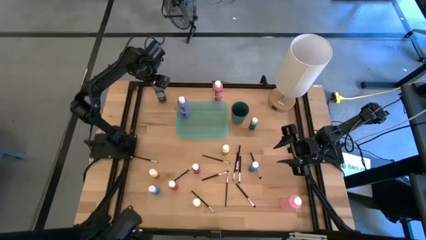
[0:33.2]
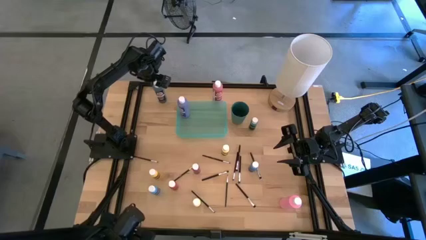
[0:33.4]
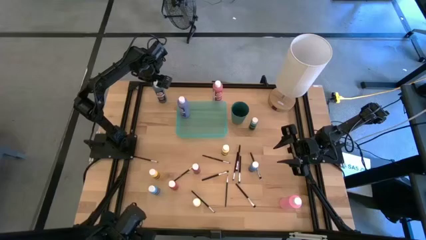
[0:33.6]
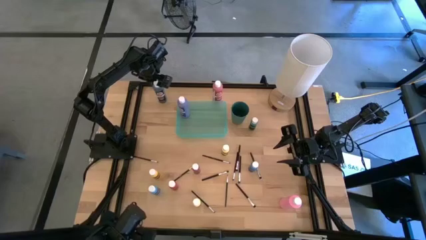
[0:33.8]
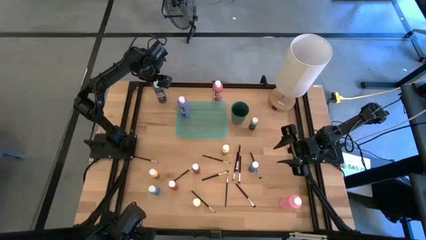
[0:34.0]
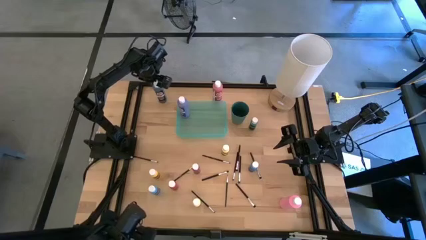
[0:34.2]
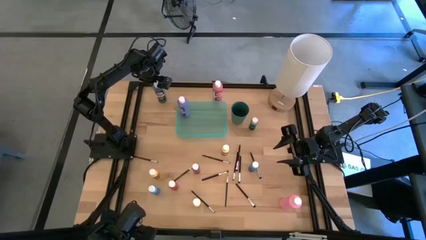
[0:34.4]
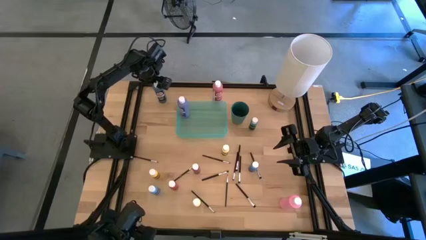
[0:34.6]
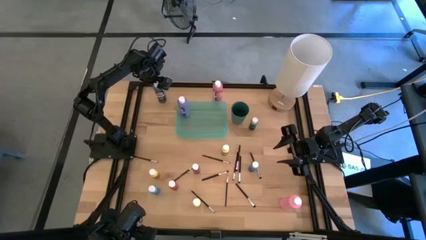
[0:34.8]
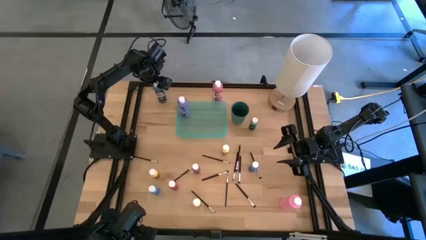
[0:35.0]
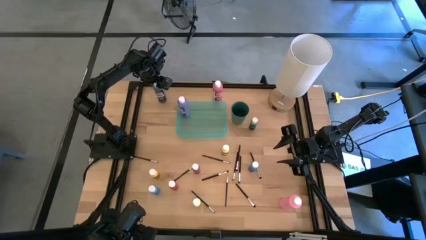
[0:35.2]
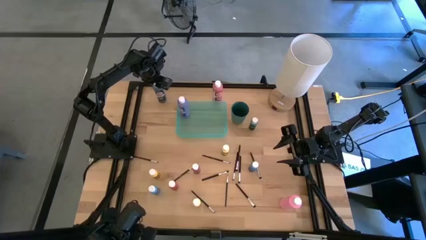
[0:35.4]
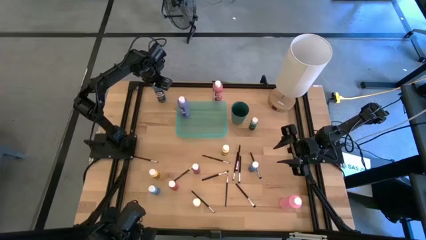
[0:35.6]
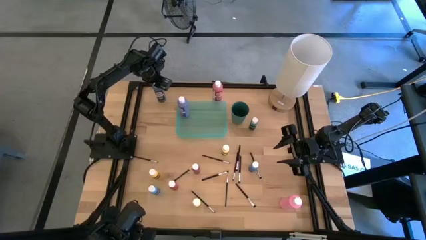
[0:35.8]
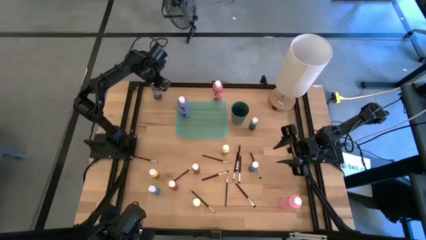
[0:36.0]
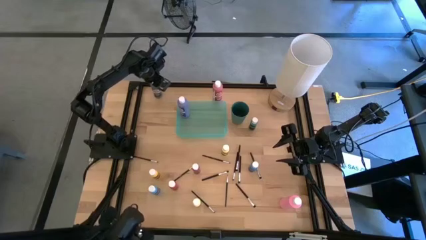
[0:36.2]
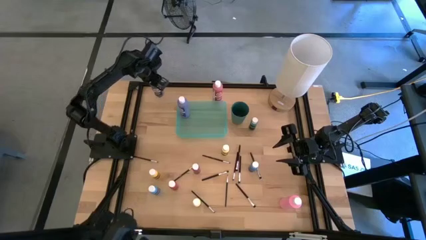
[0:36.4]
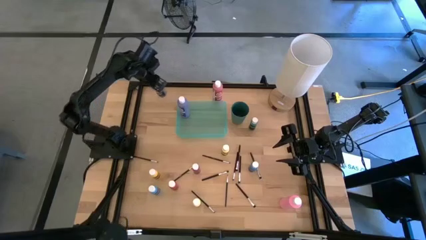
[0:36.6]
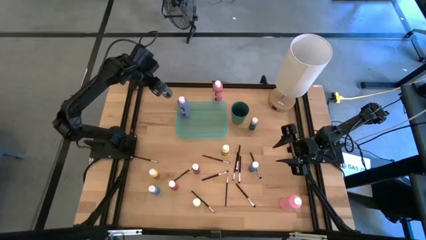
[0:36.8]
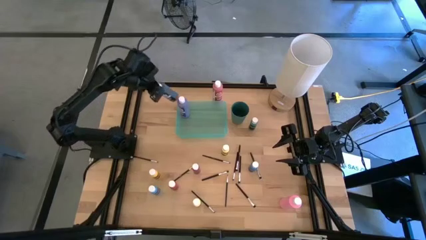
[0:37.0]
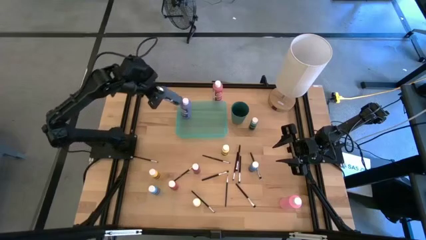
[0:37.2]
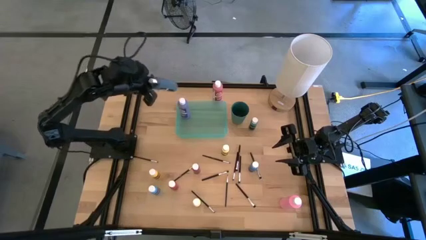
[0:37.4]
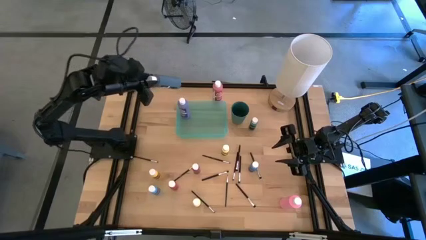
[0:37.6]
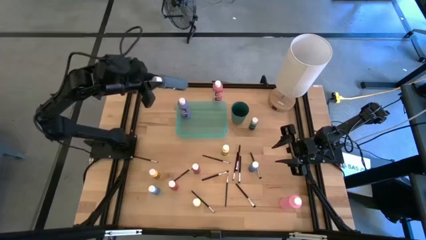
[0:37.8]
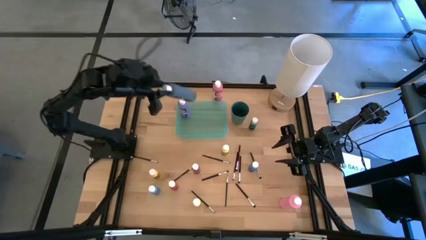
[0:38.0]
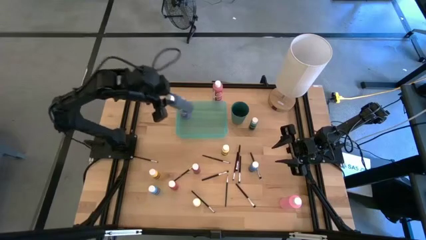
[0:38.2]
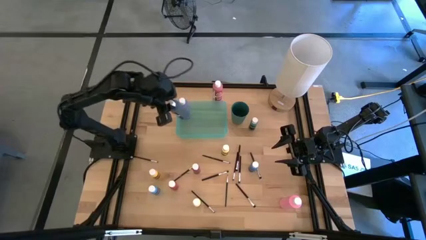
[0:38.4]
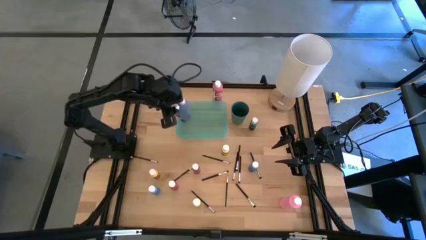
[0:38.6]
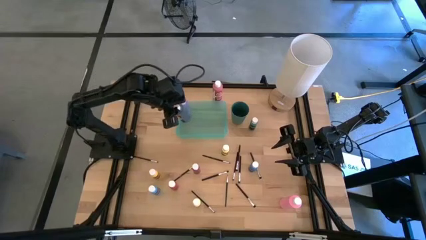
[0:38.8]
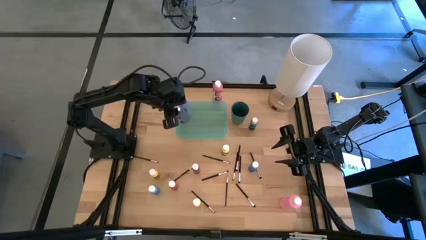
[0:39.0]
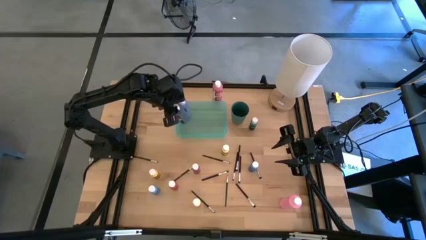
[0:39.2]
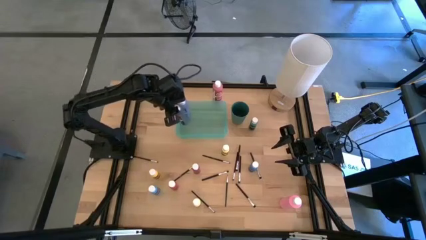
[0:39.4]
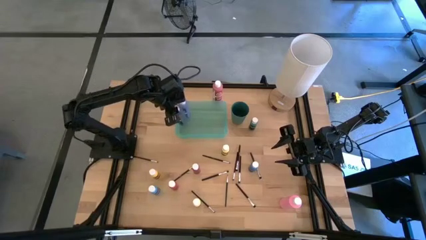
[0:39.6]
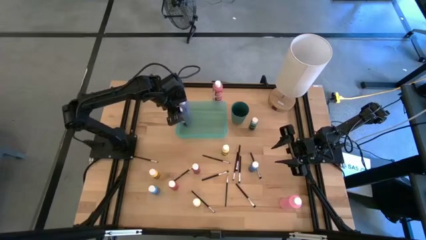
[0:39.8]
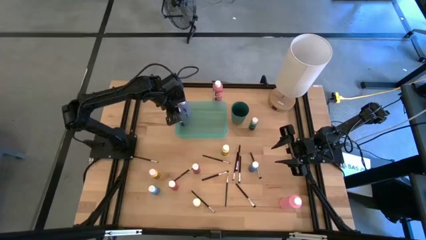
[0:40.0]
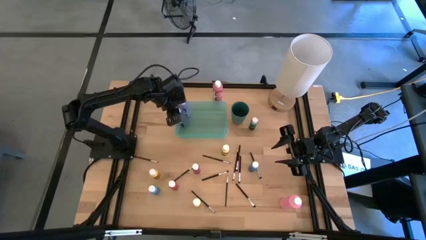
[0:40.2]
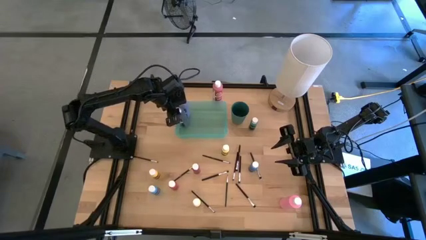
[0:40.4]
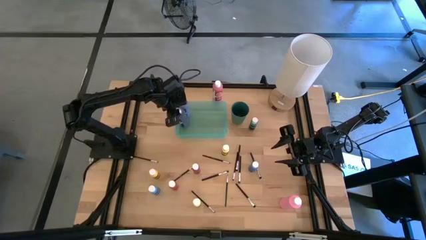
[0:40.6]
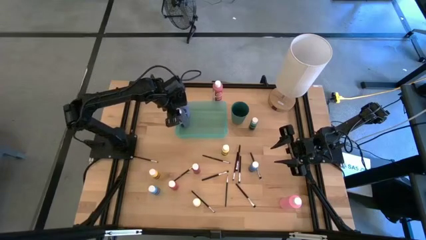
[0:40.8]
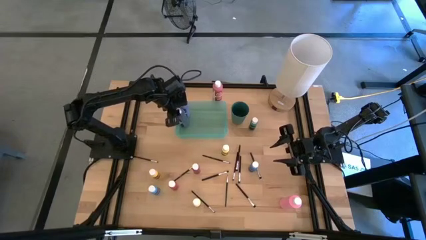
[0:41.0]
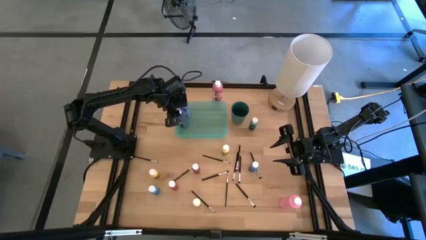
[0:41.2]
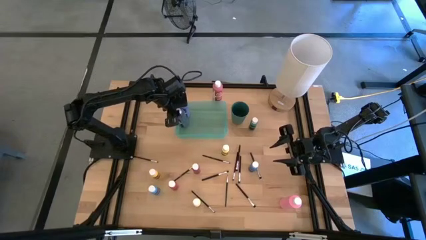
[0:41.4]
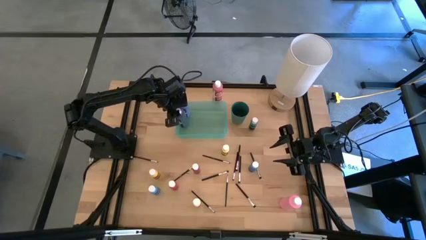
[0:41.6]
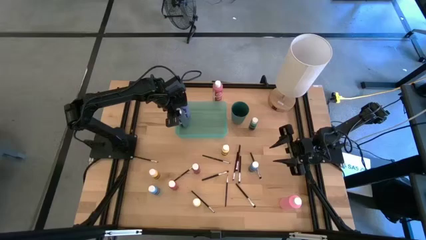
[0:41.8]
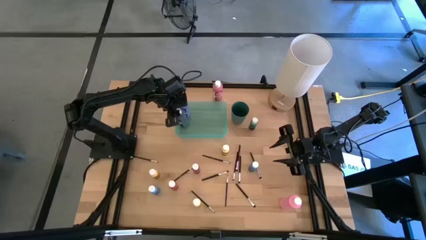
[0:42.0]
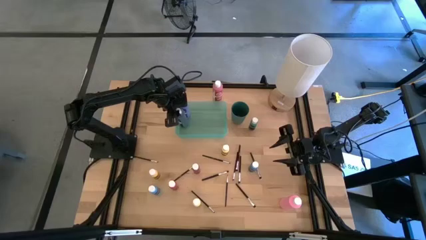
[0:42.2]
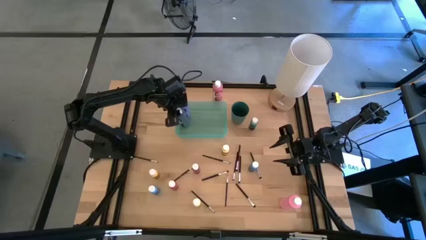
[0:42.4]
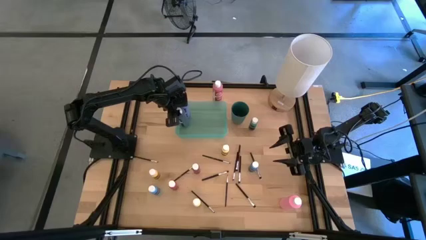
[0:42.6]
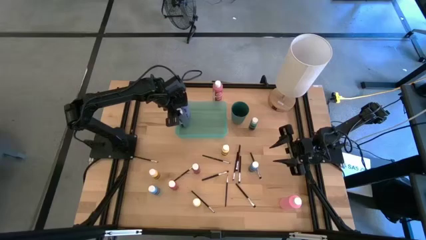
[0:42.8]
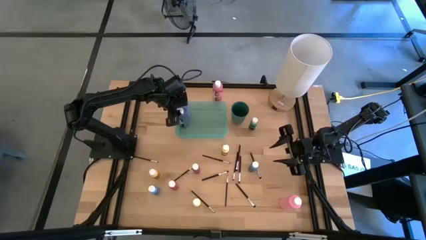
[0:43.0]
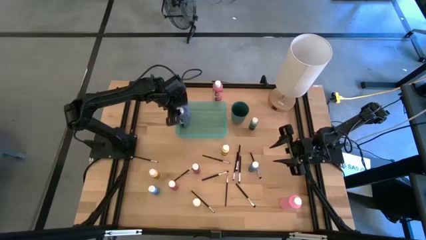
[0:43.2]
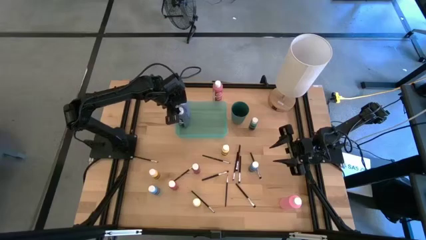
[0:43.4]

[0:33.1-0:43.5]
Task: Pick & Place Paint Supplies
Put the big dark green paint bottle into the green bin

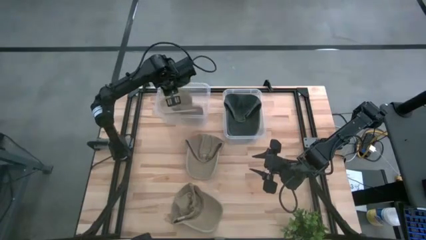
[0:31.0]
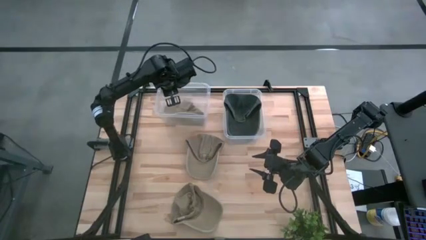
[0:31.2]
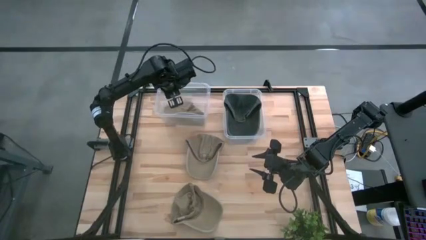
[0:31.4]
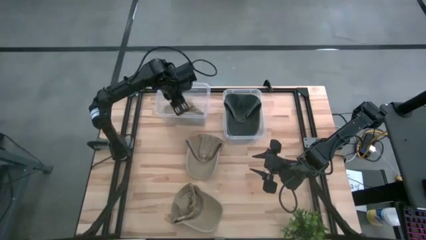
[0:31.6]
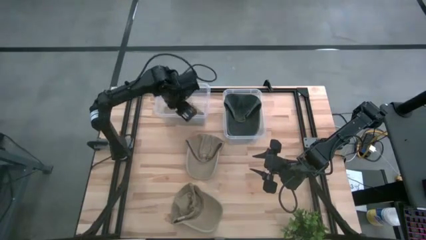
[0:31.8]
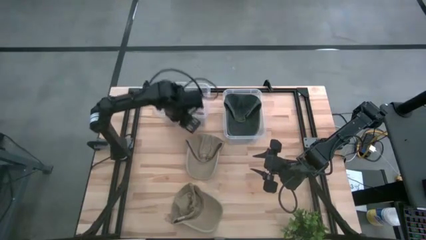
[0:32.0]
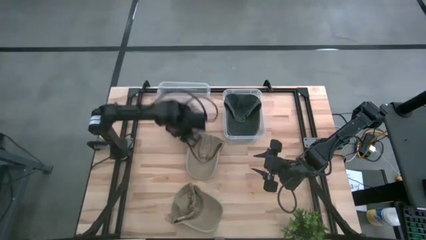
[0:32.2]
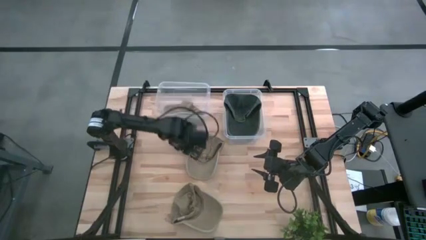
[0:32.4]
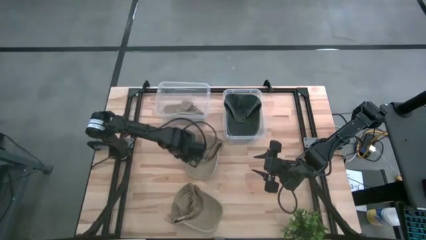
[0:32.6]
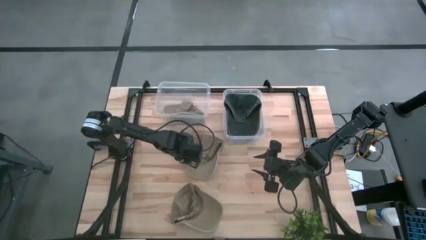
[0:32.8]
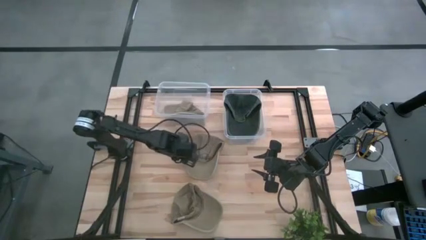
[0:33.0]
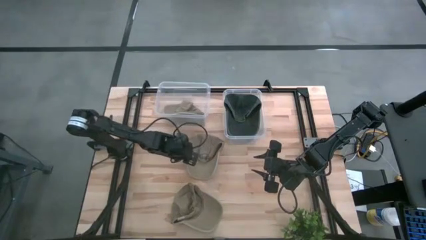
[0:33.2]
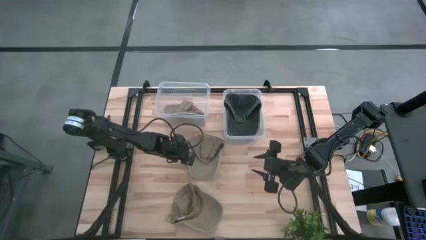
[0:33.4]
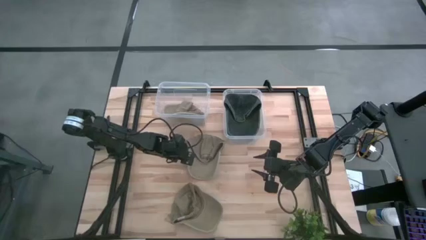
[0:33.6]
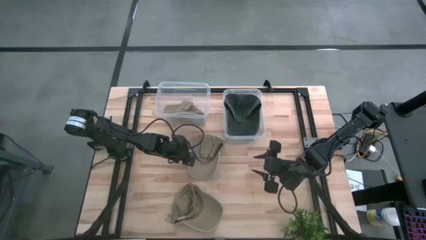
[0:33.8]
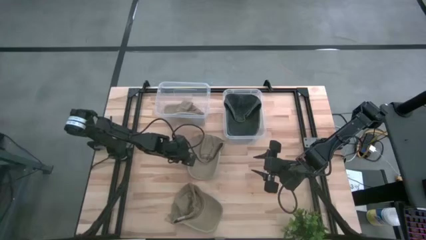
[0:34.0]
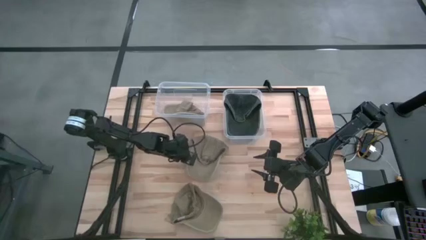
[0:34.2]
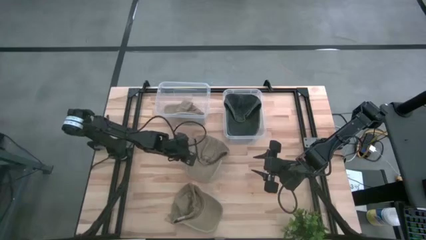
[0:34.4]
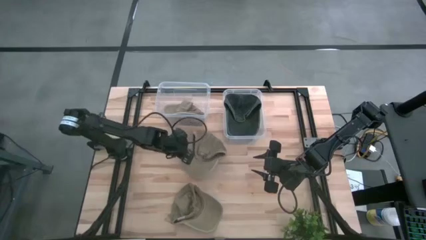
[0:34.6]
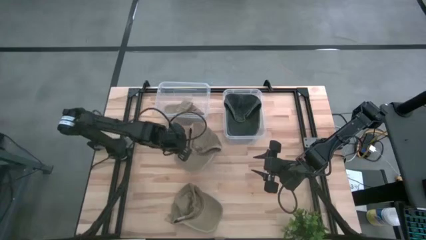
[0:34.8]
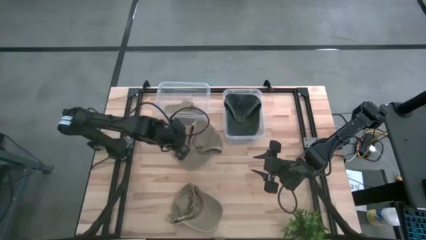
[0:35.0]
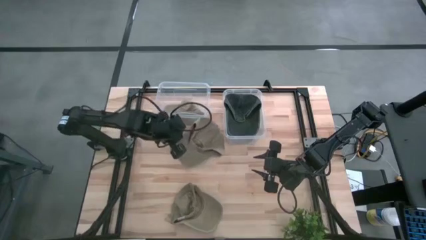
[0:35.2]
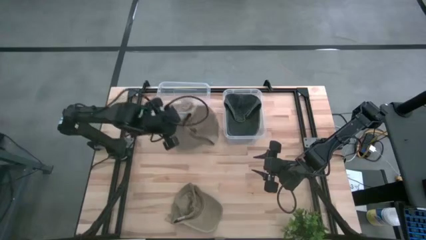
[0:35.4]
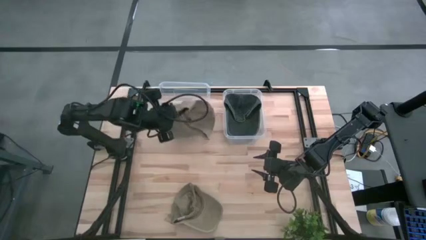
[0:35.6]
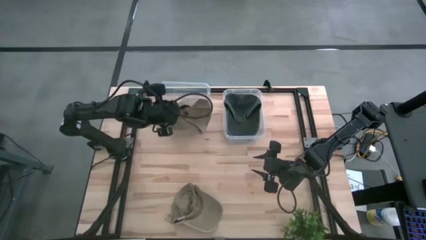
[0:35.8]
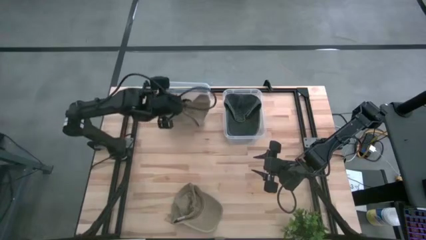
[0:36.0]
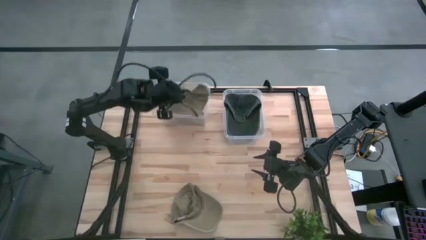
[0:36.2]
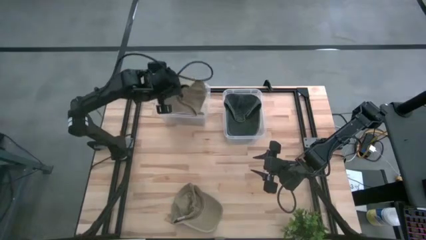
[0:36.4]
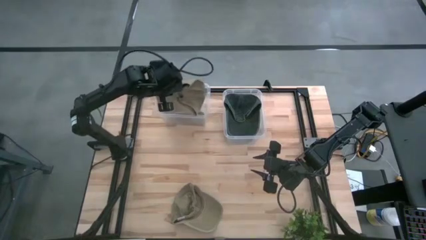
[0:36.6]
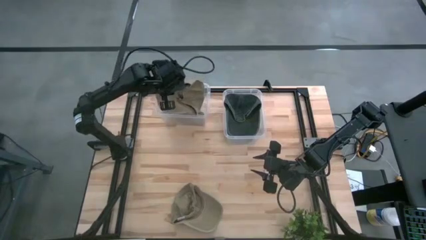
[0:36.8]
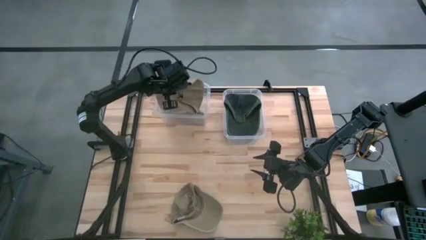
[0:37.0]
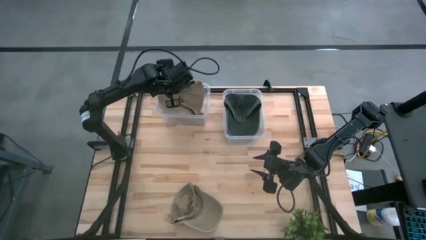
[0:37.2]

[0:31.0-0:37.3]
Task: Pick & Place hat
Put the top light brown cap into the left transparent bin
